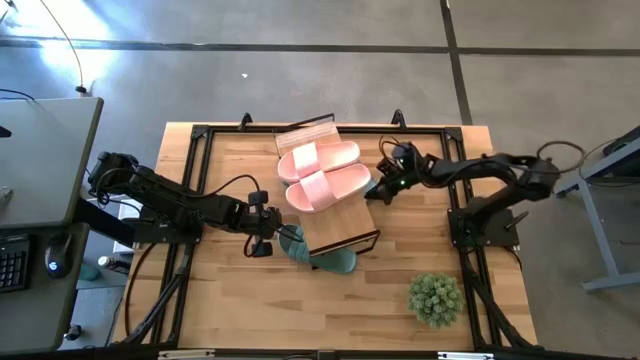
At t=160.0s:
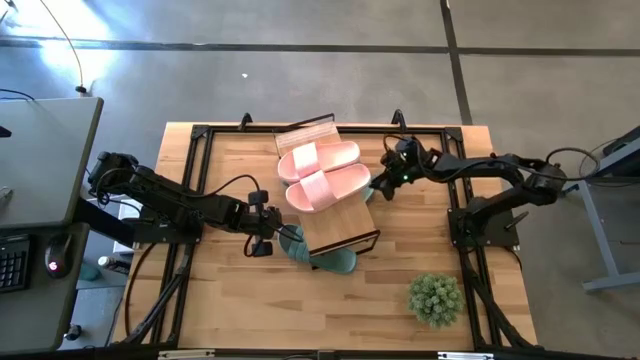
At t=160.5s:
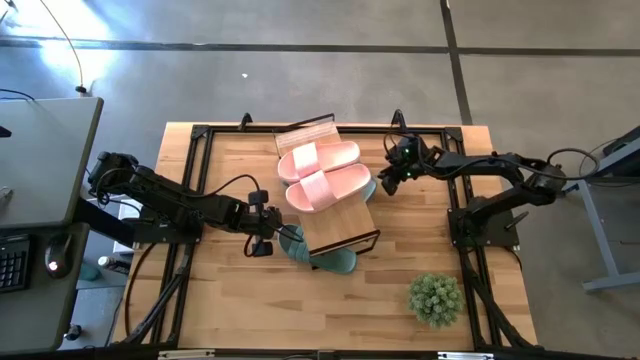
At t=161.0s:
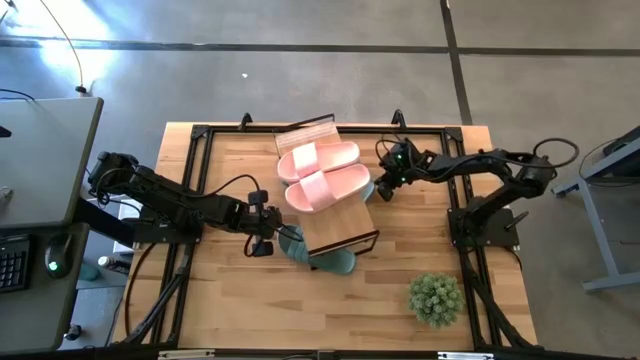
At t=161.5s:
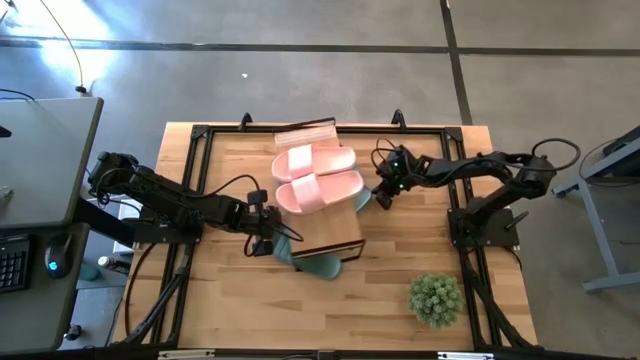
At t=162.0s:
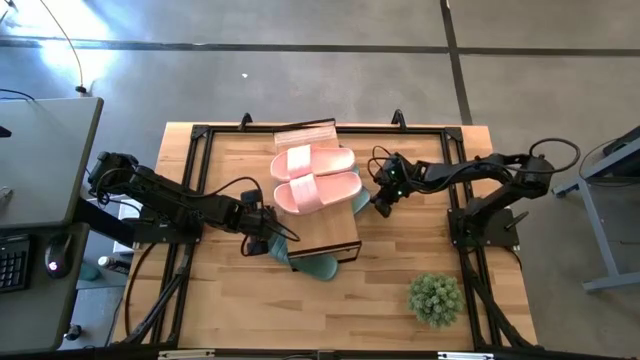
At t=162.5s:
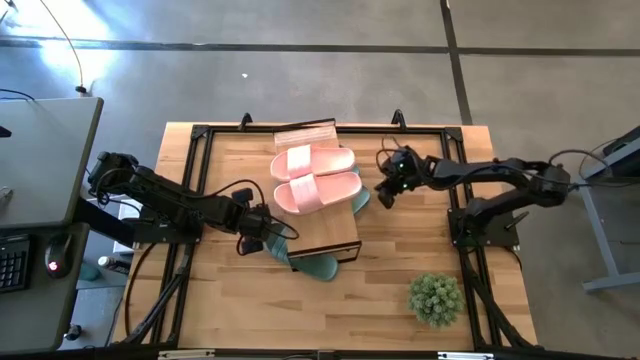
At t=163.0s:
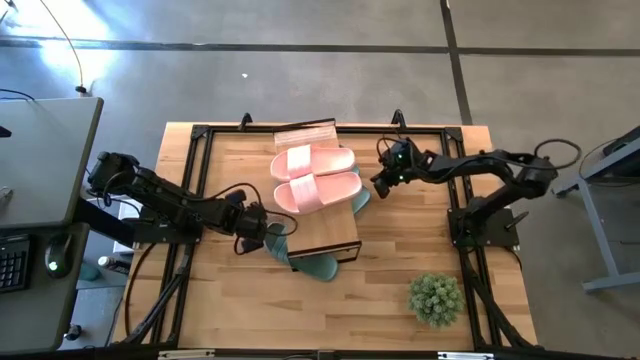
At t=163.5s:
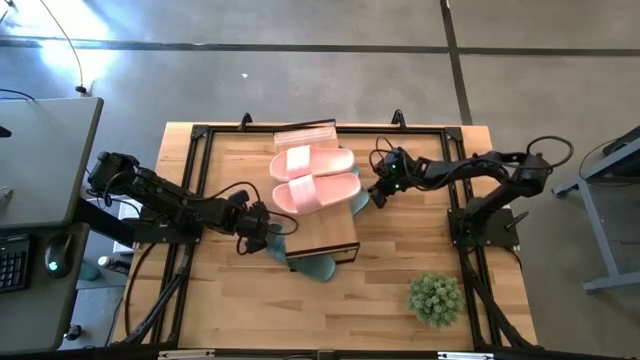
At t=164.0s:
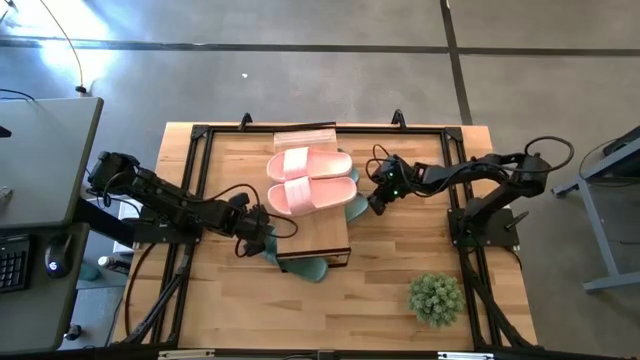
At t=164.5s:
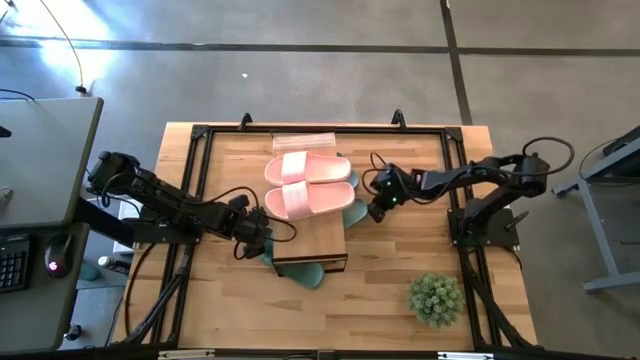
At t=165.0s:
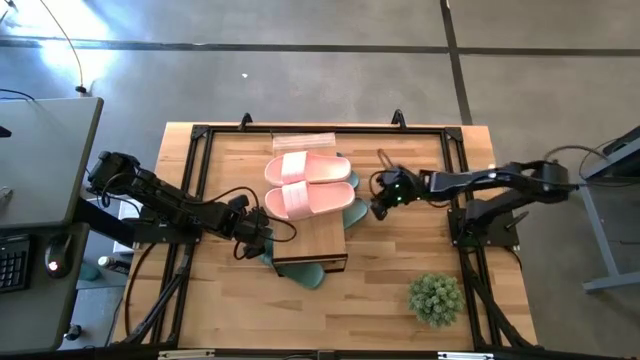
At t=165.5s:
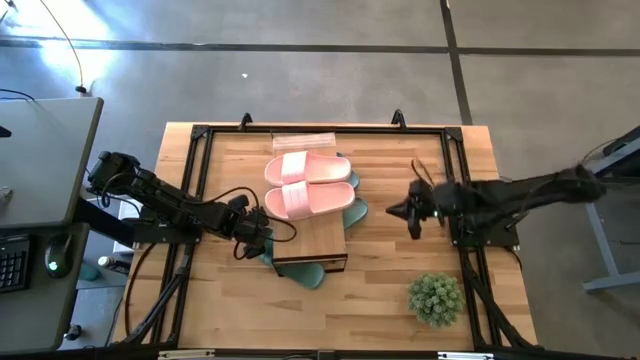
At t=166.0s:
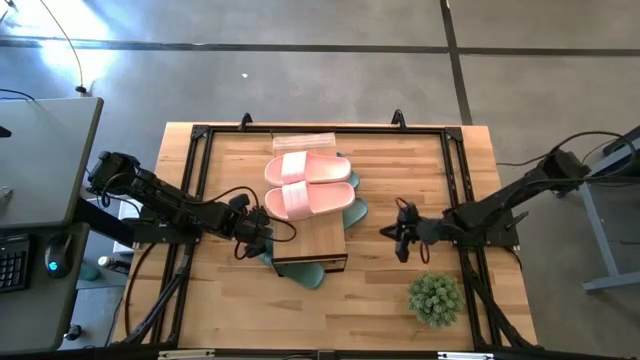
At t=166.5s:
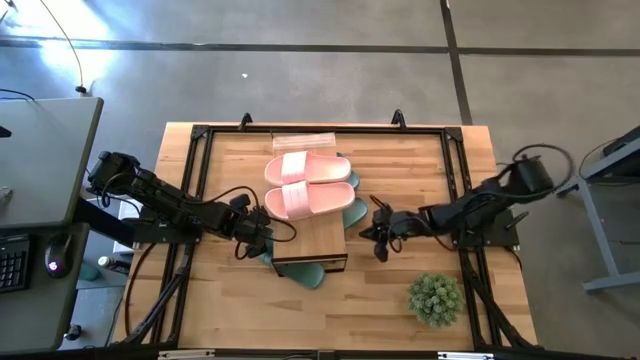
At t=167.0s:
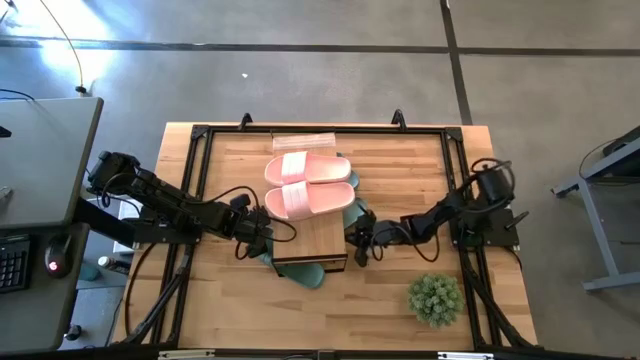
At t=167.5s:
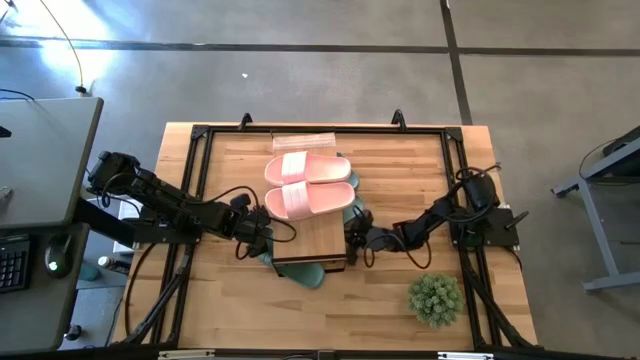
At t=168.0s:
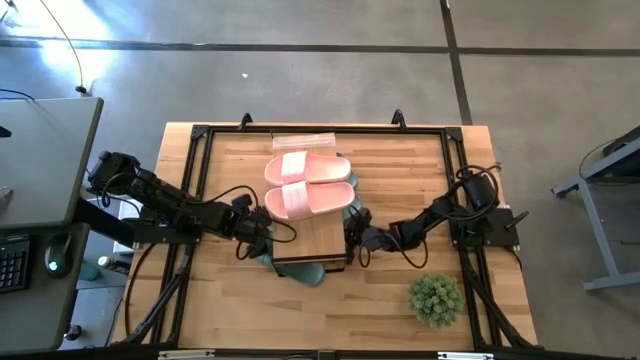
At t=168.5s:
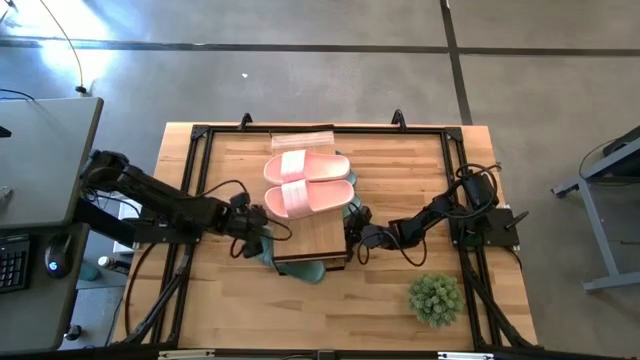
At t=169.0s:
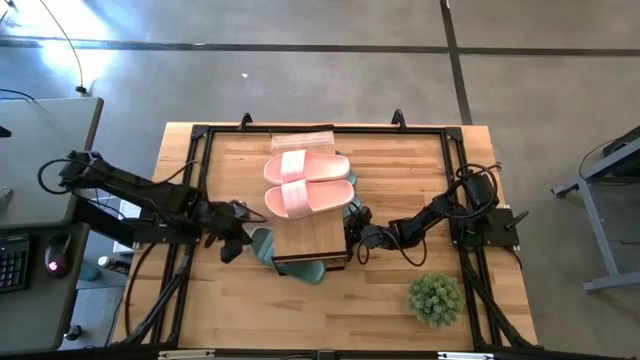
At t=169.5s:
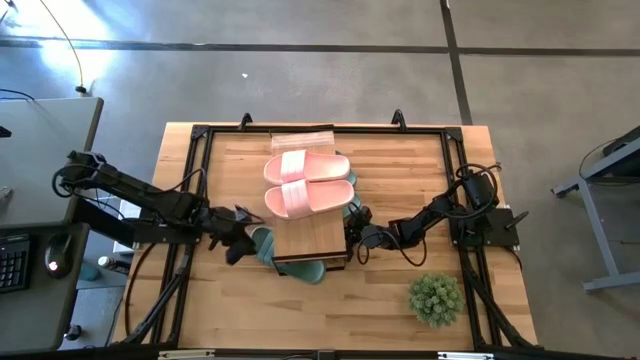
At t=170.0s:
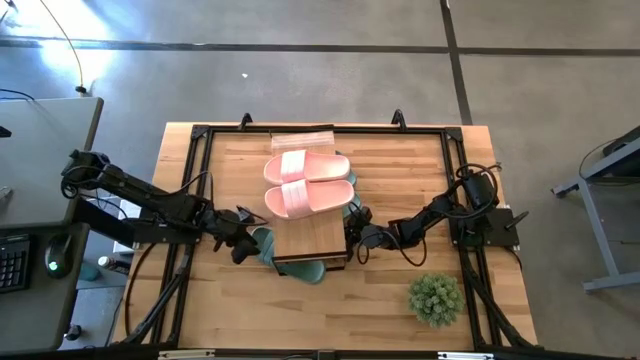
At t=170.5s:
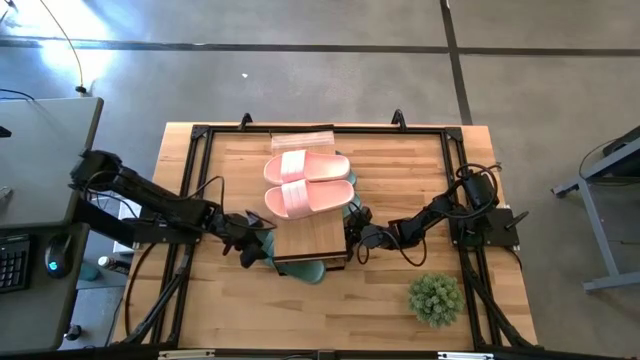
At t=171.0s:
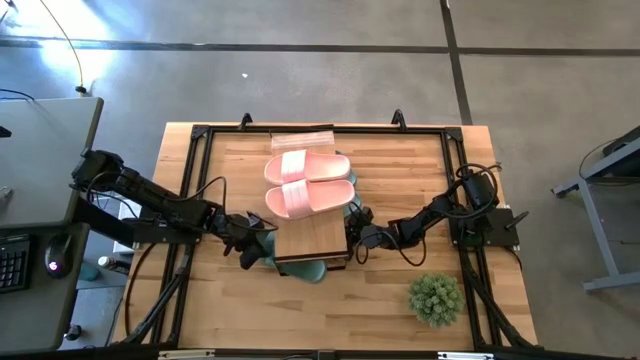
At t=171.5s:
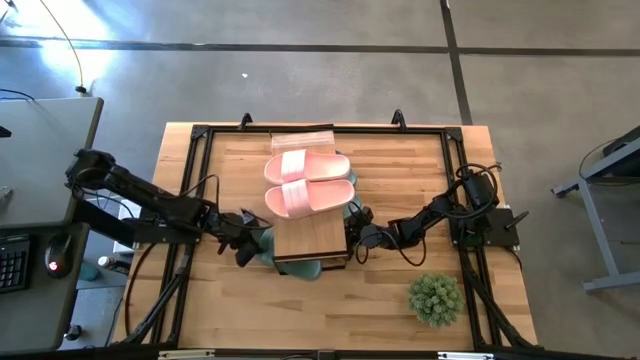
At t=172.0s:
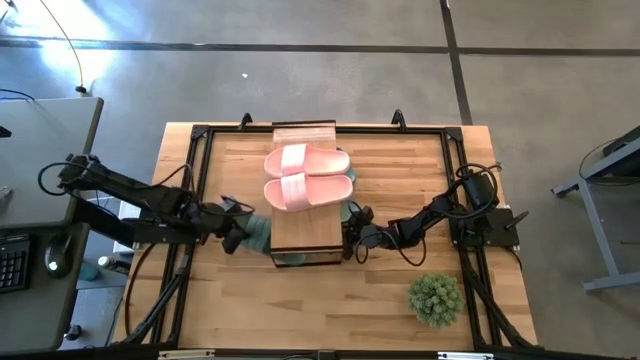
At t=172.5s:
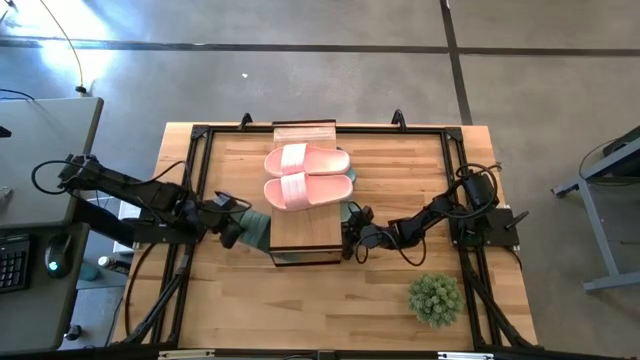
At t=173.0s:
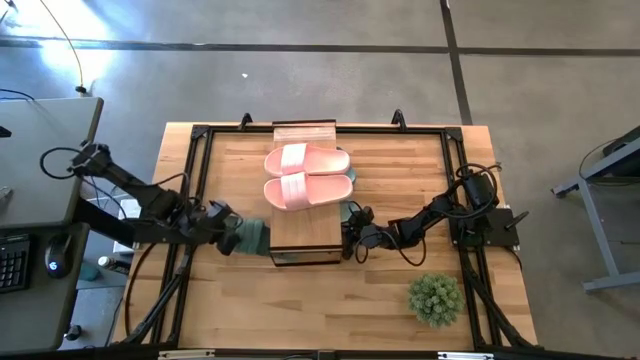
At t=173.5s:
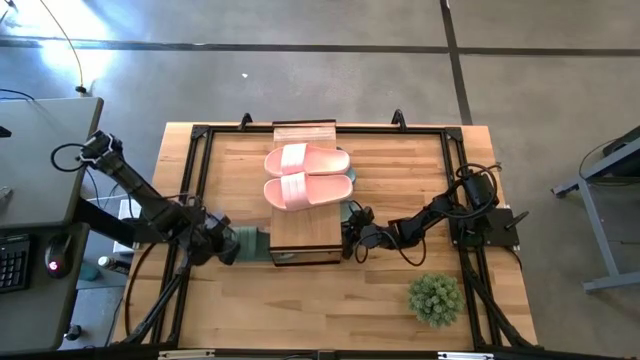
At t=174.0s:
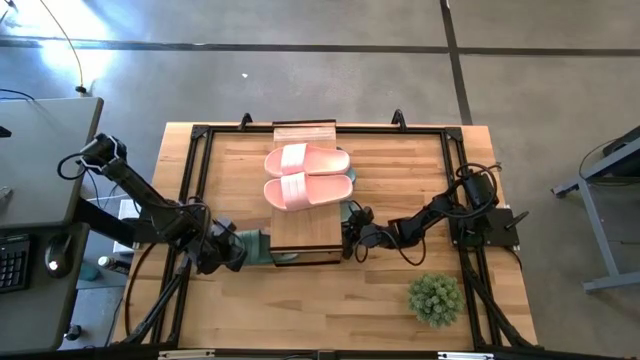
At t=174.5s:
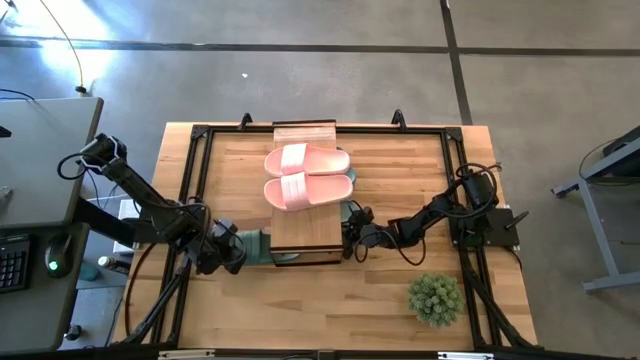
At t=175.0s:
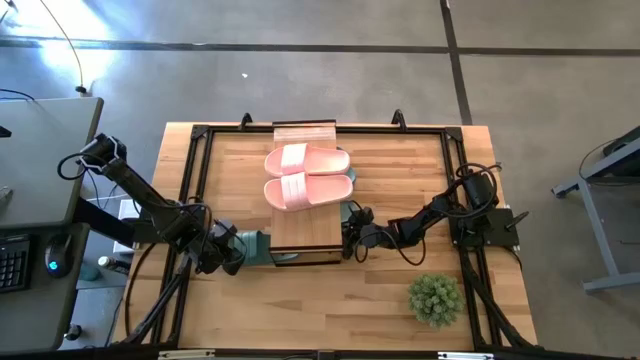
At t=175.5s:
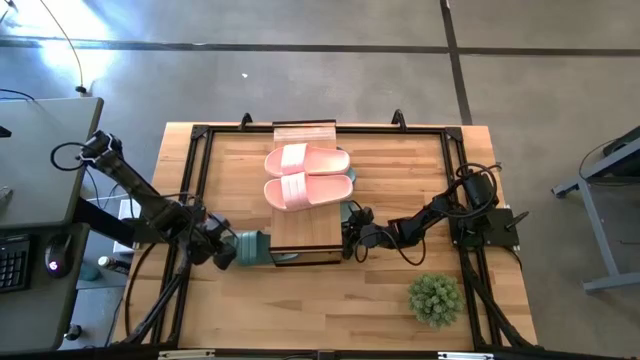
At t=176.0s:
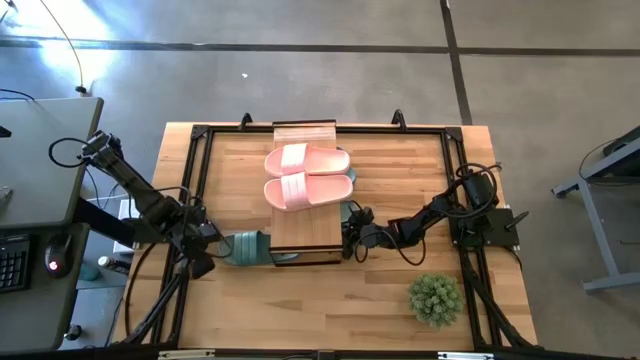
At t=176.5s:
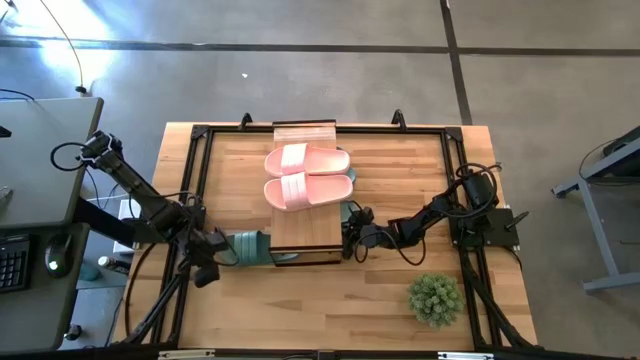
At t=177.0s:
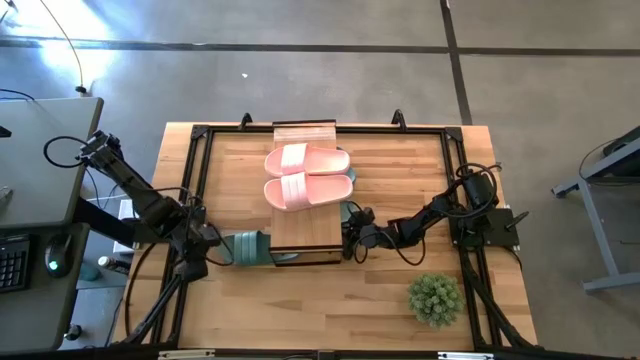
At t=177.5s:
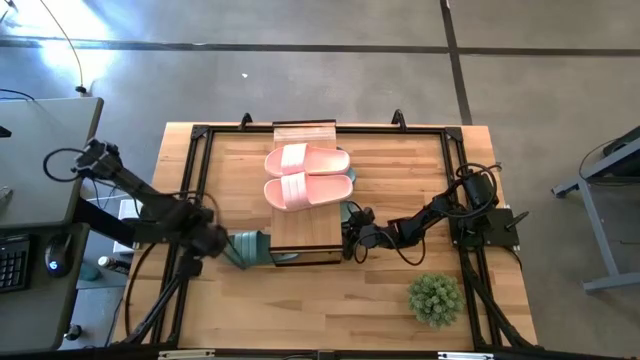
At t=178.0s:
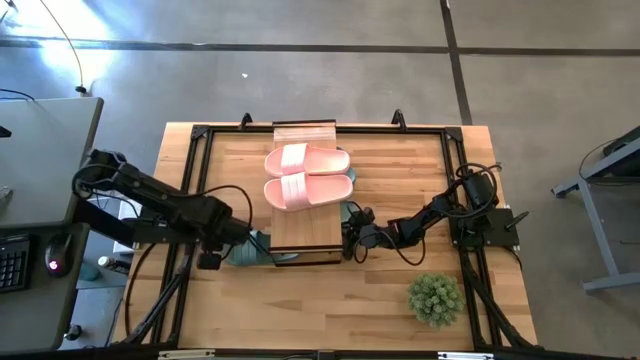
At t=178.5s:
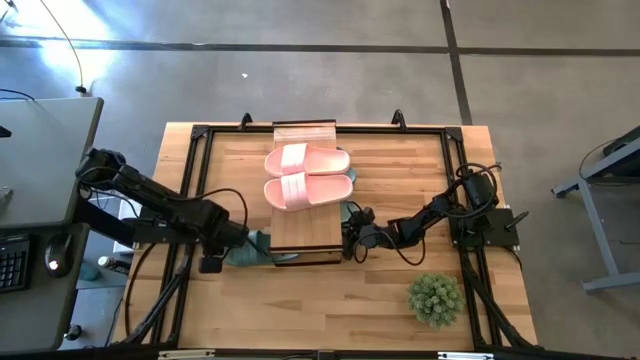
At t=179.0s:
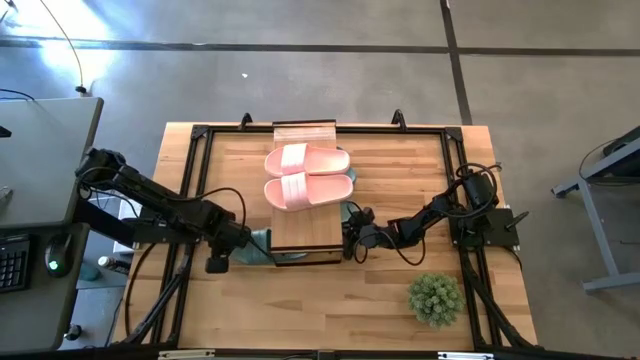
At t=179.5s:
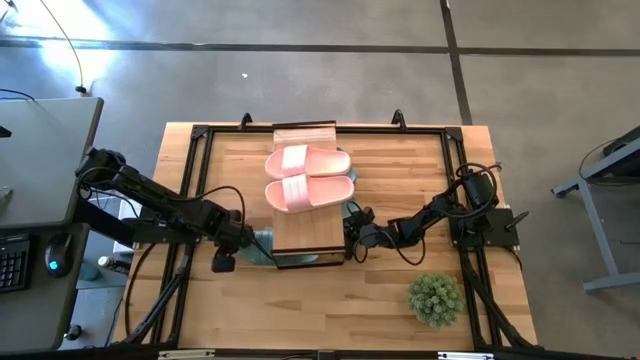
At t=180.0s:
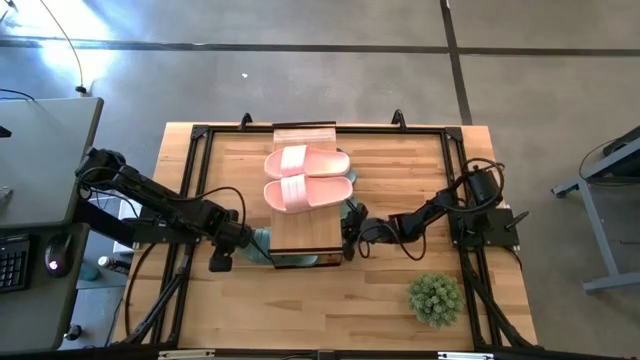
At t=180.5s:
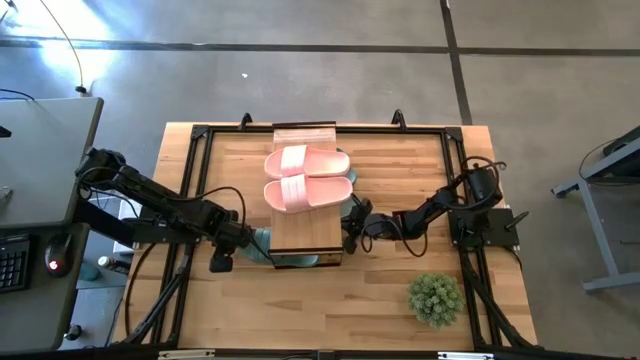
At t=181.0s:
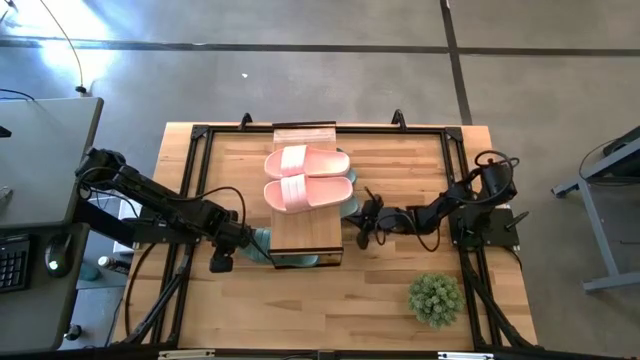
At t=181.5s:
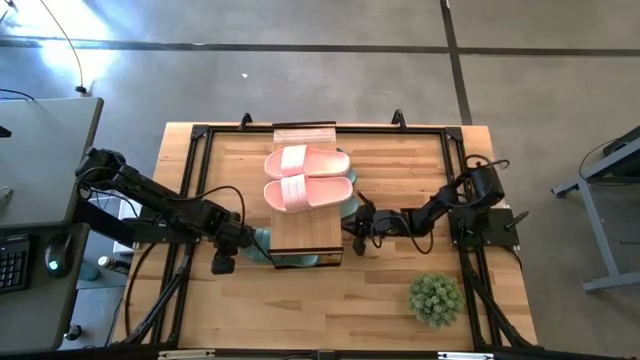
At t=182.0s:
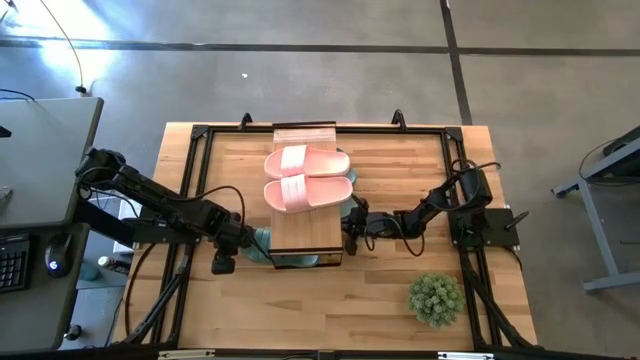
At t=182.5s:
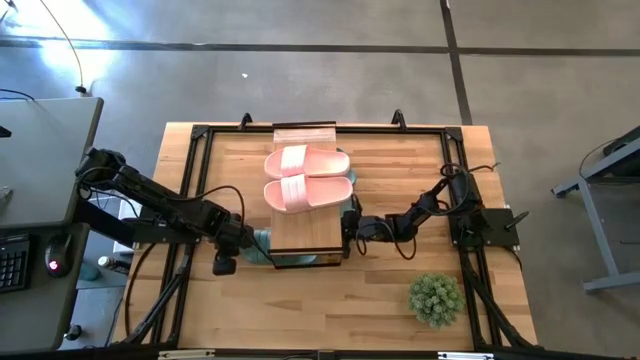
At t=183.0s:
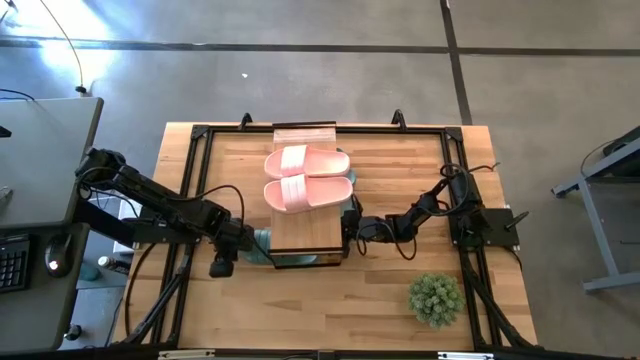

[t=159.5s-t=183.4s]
Task: Pick and place slides into the shelf
Put the green slide under the shelf
